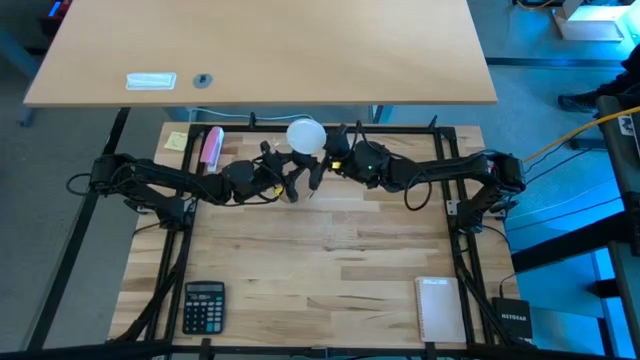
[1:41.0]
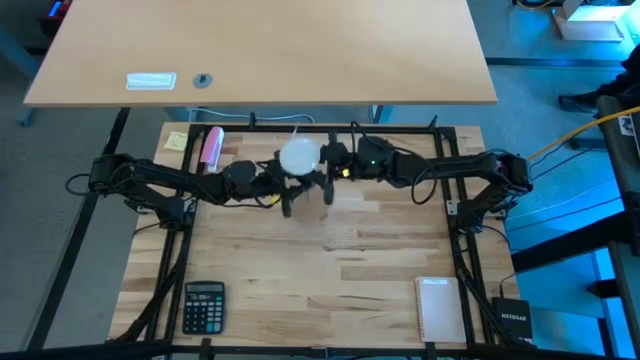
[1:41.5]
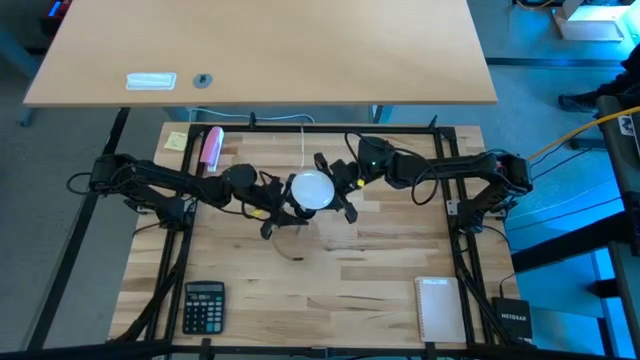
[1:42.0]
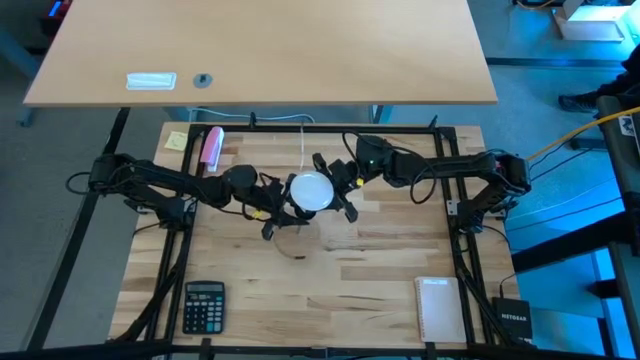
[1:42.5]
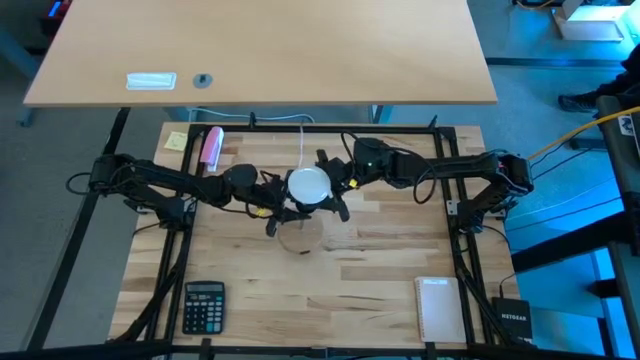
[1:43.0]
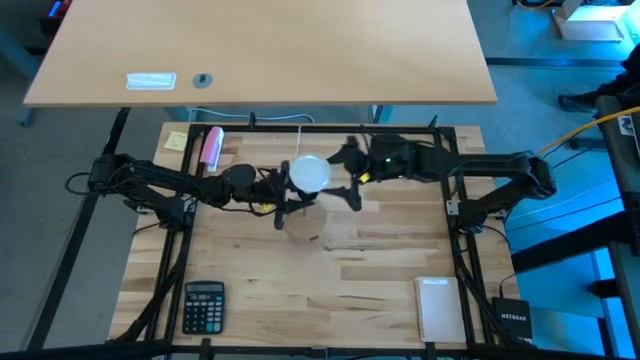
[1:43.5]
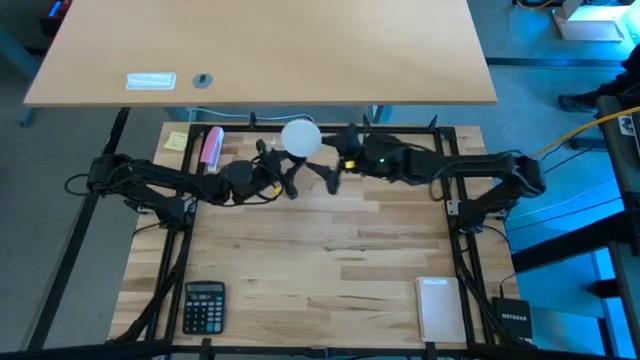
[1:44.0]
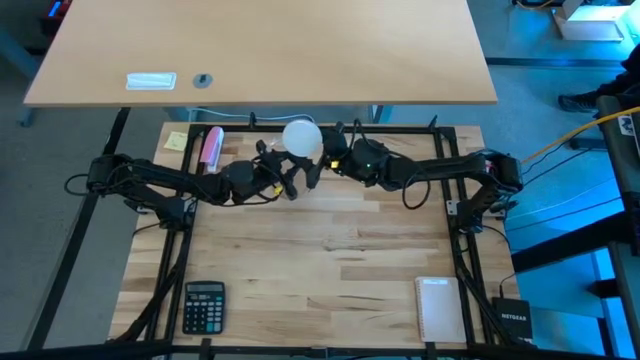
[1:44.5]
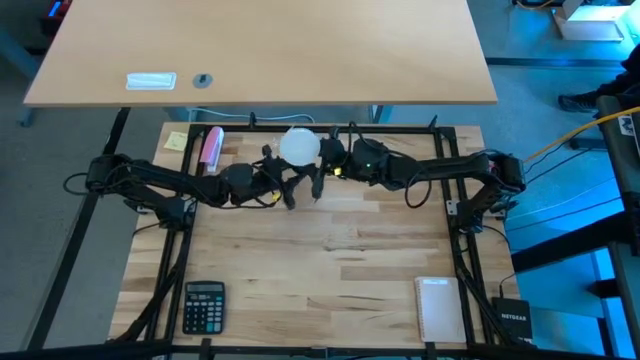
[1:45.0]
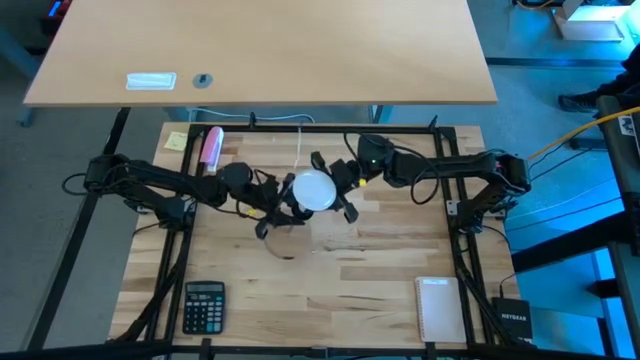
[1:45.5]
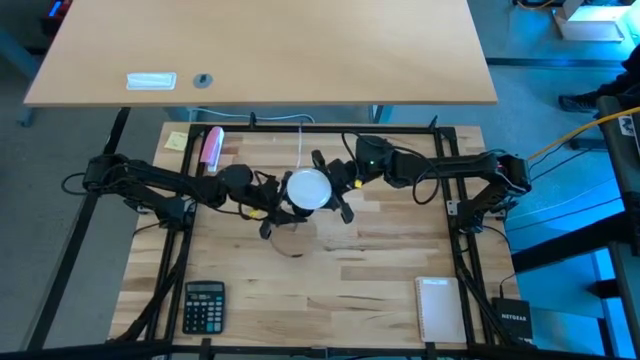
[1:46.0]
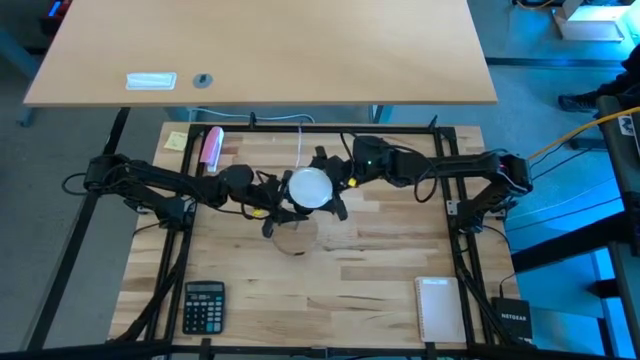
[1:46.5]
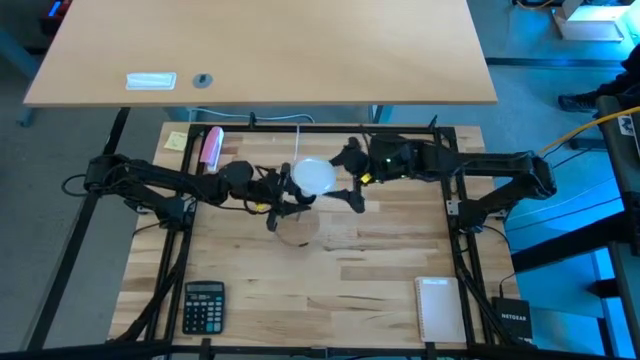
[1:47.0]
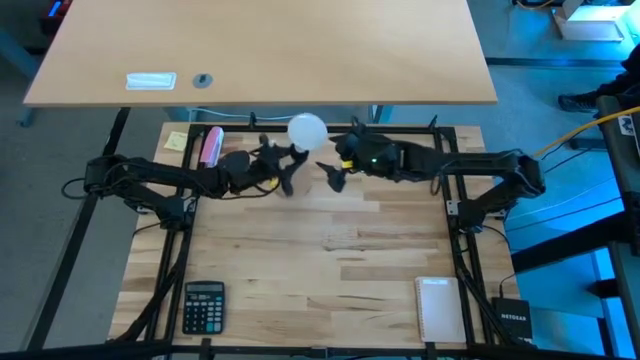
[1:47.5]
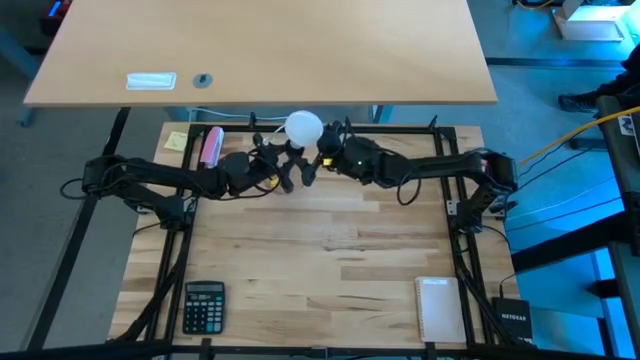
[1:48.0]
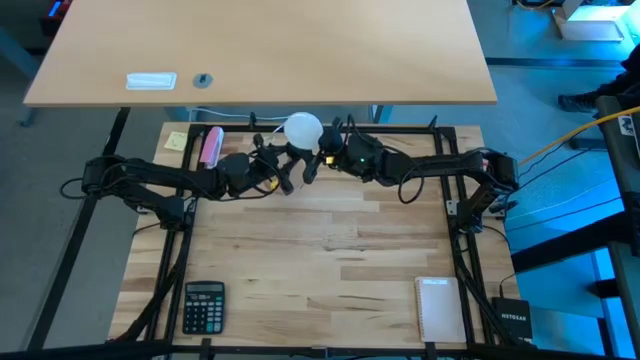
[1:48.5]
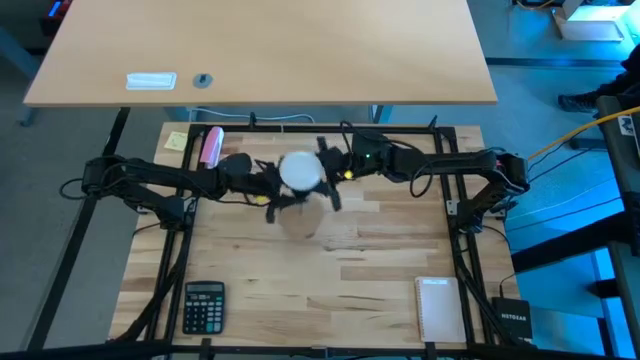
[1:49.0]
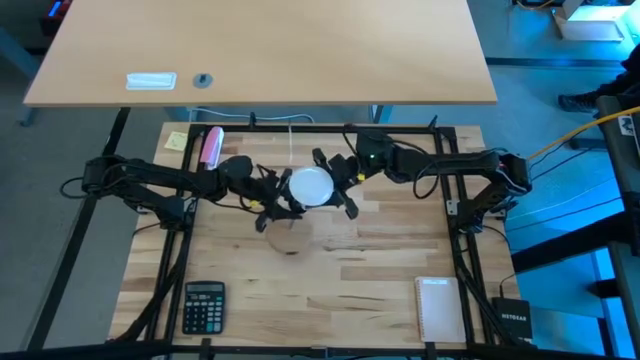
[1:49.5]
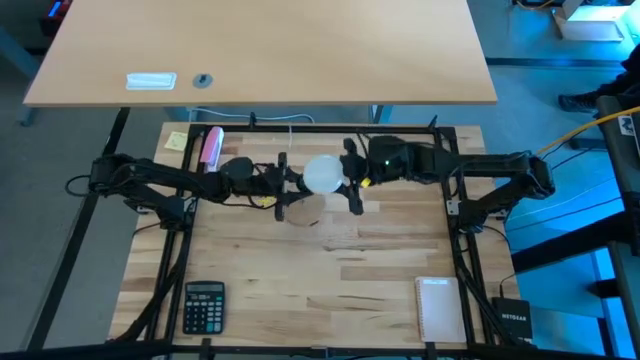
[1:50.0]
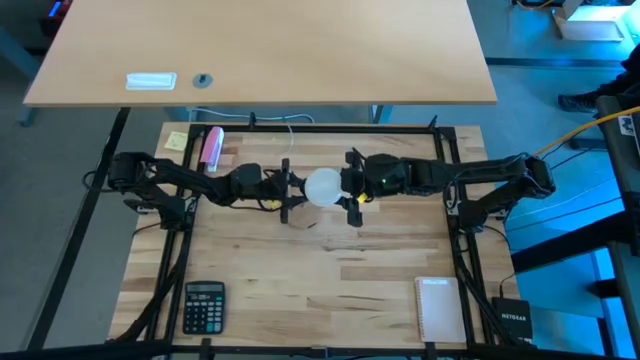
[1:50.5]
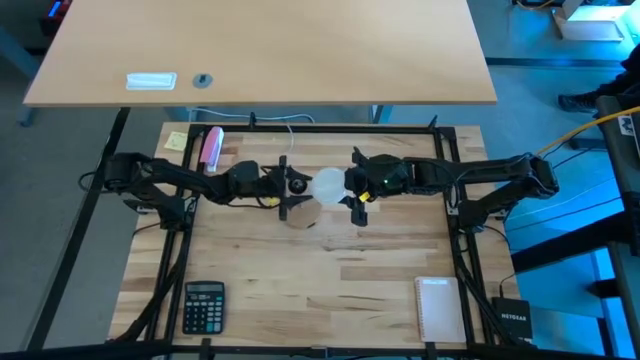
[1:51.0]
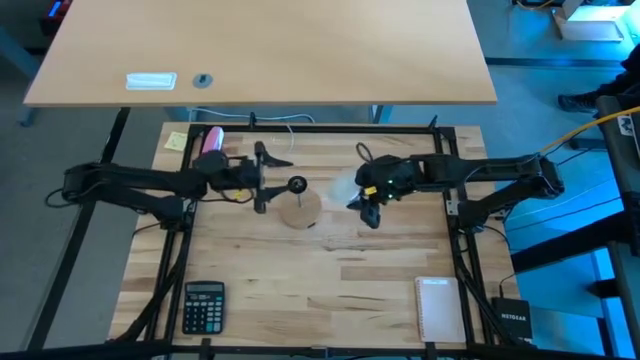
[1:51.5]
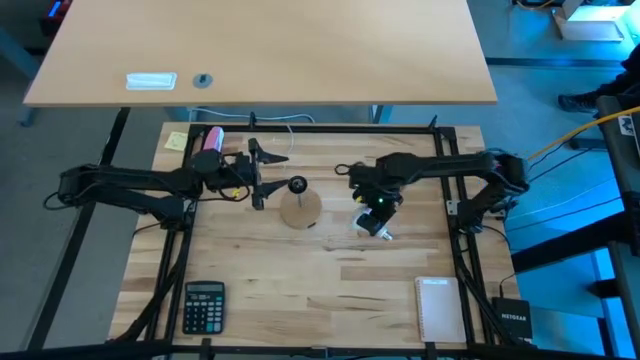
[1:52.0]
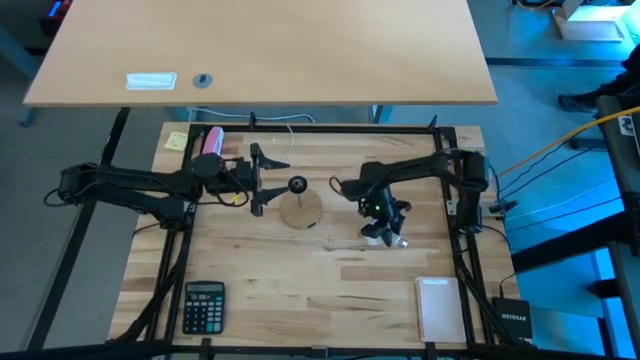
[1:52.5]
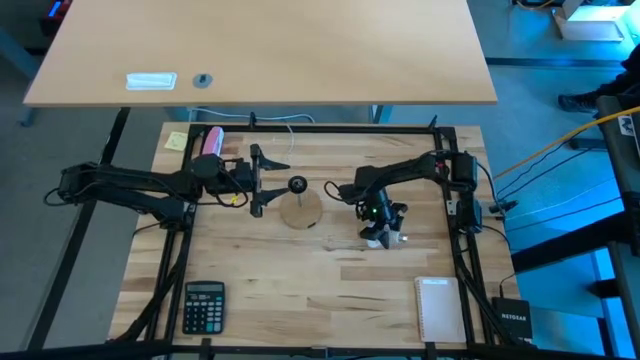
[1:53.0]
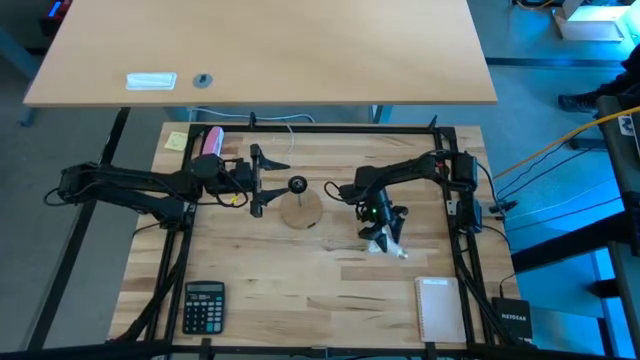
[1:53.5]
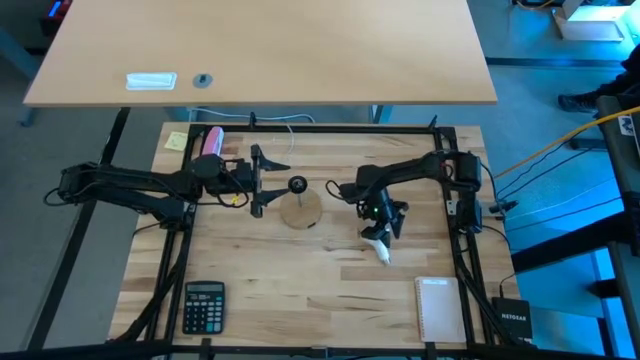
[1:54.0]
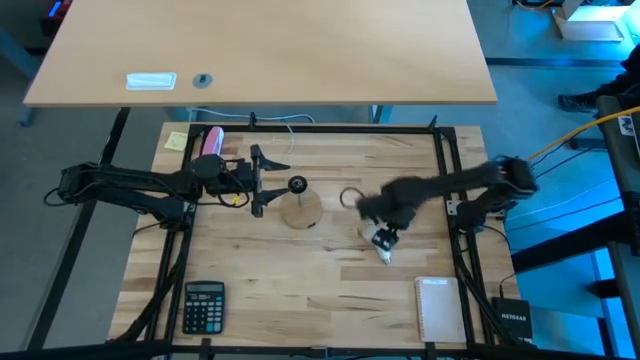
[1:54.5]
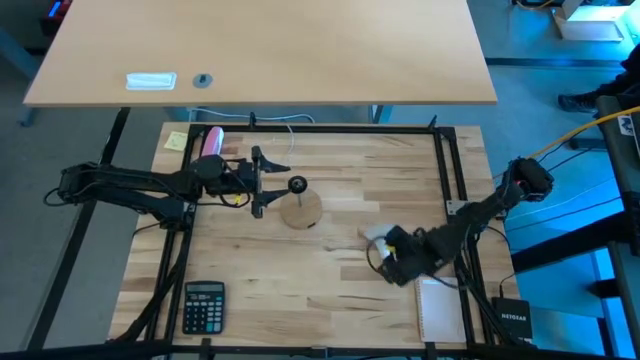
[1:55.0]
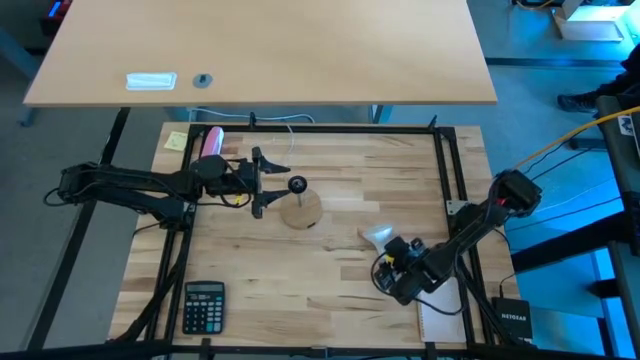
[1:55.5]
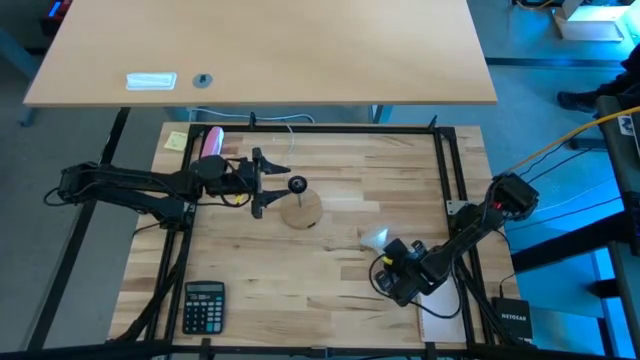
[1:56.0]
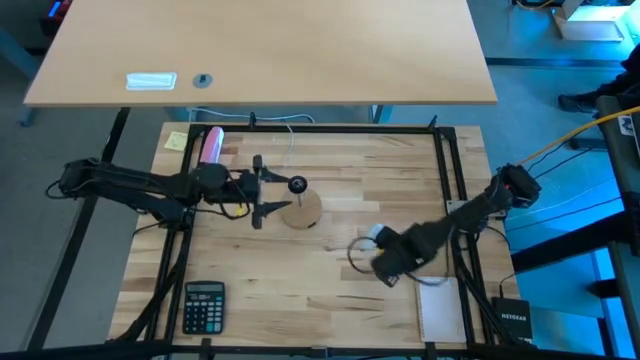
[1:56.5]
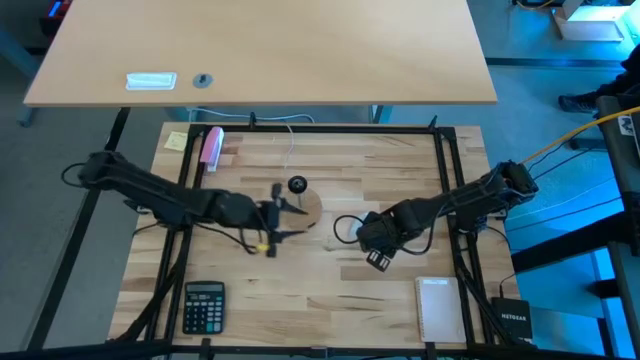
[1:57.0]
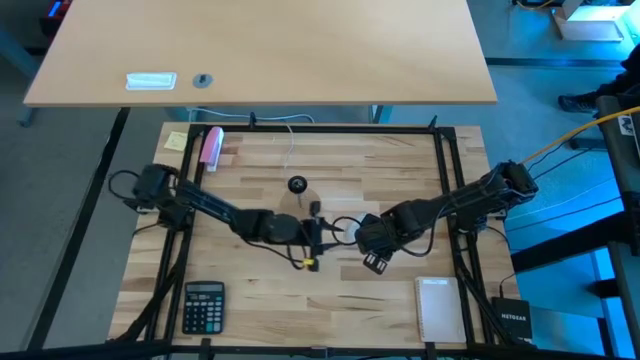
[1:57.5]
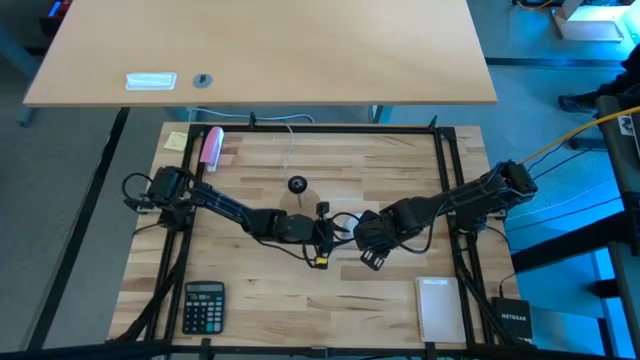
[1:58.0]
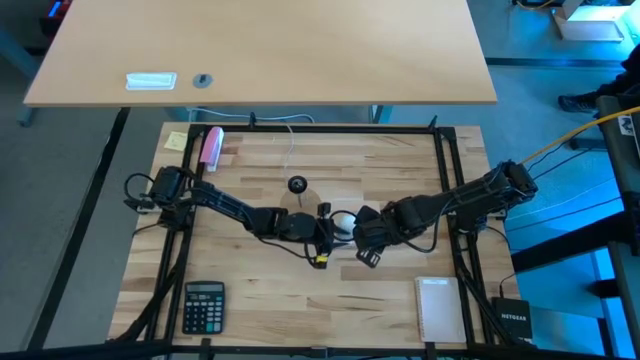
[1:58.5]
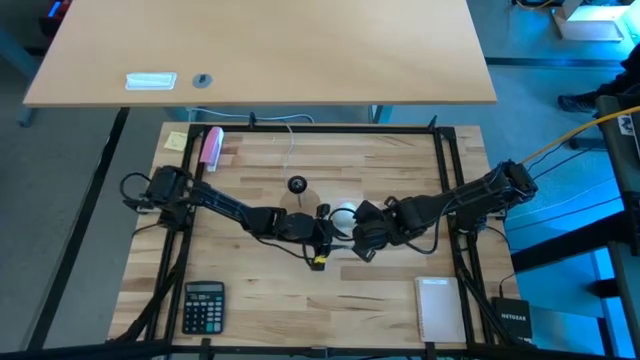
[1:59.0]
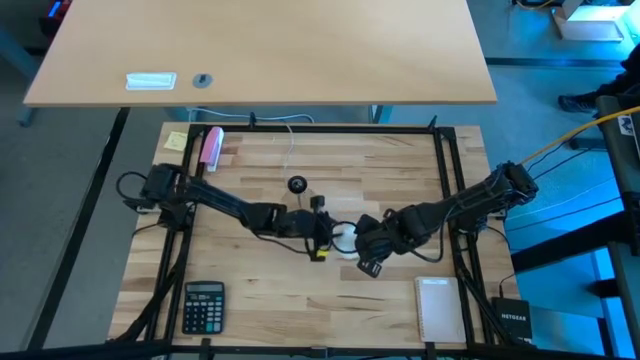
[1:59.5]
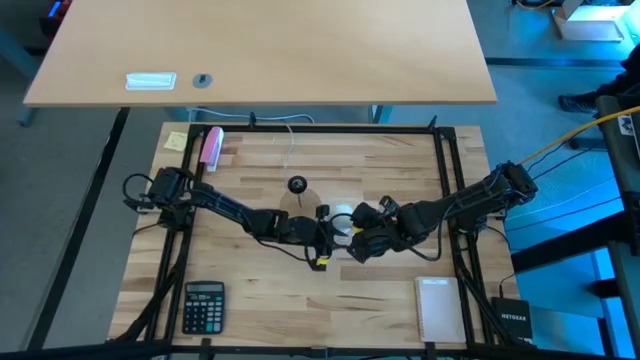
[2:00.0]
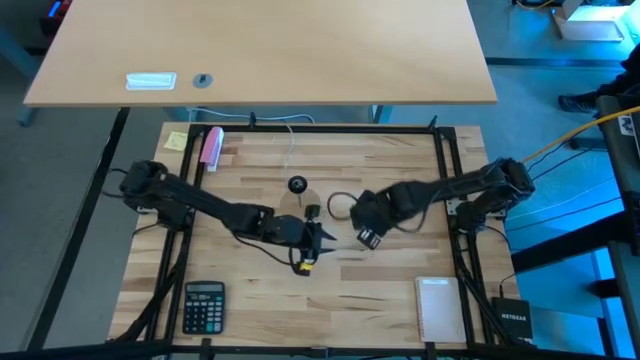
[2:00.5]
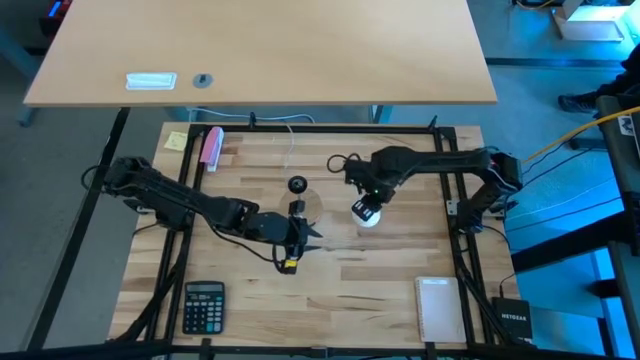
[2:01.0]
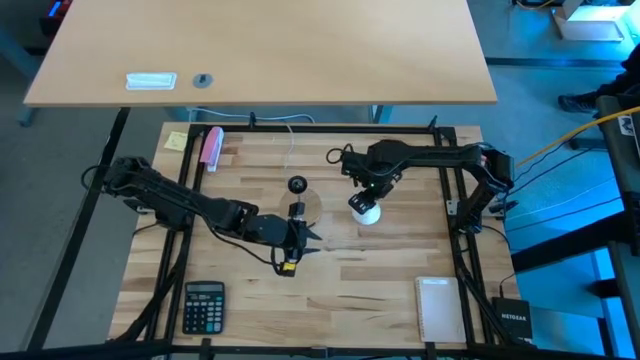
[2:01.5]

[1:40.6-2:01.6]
Task: Screw lightbulb
Remove the white lightbulb from the brown lamp
